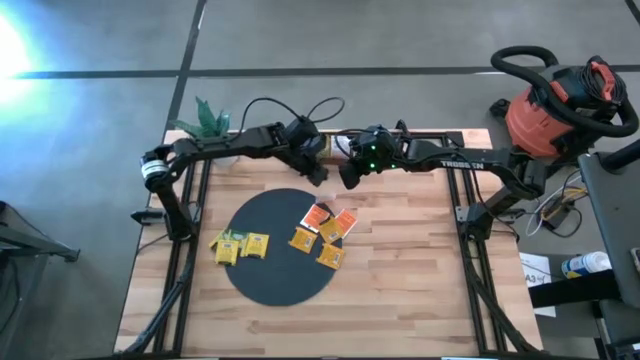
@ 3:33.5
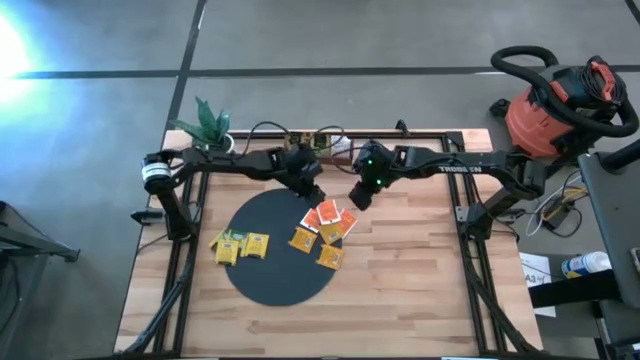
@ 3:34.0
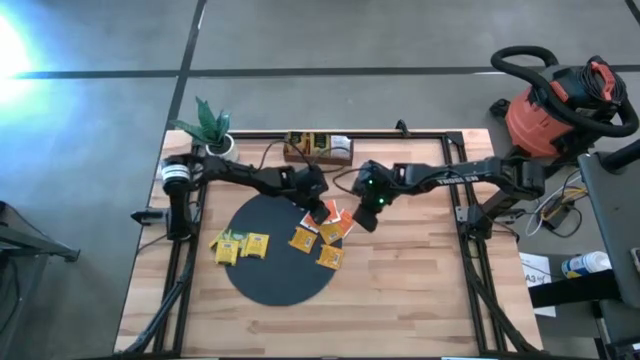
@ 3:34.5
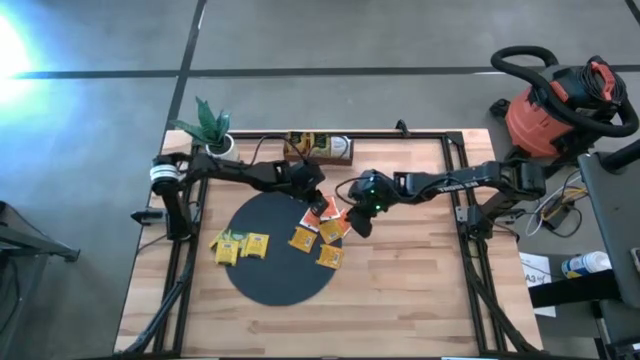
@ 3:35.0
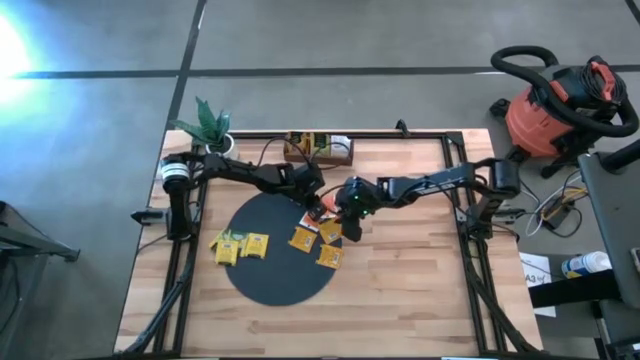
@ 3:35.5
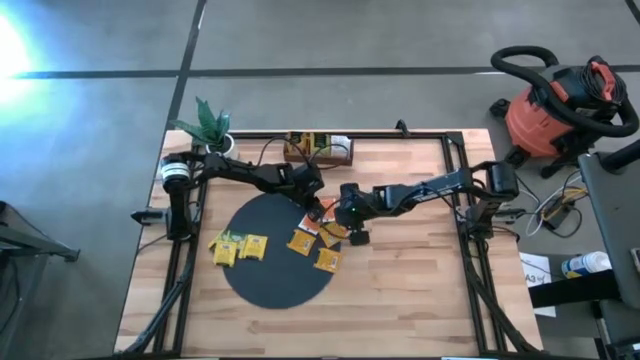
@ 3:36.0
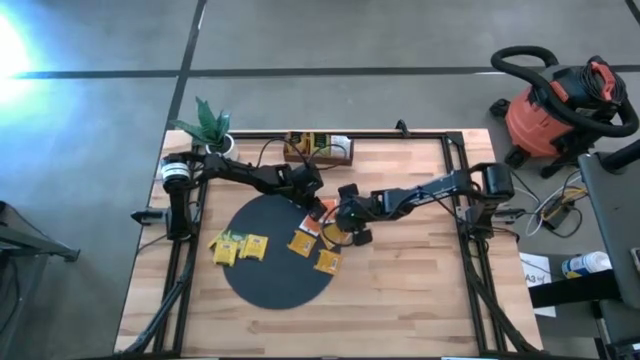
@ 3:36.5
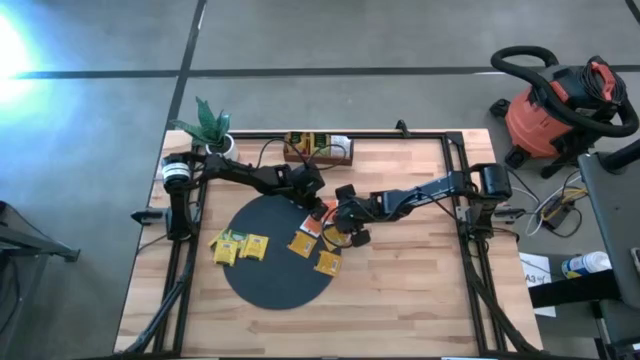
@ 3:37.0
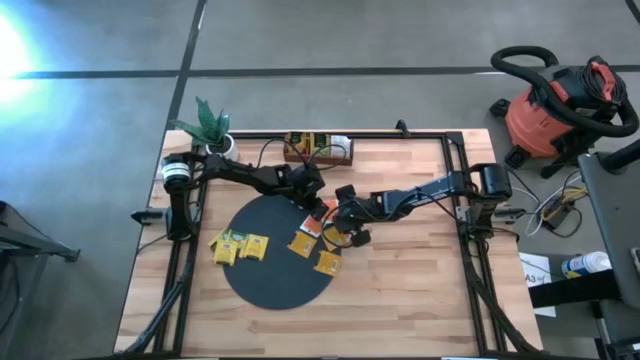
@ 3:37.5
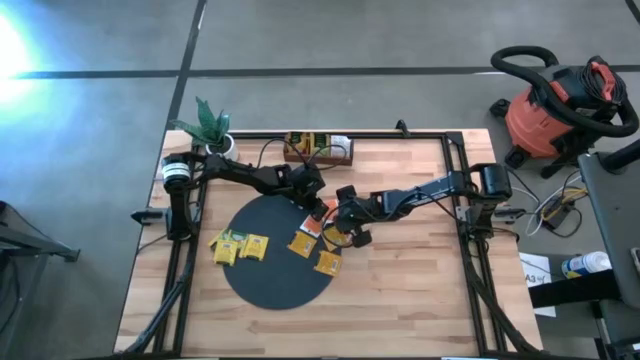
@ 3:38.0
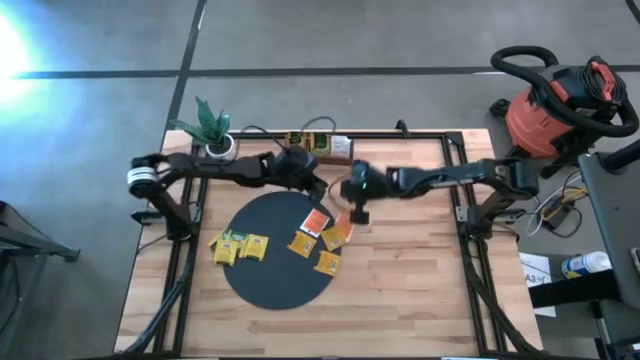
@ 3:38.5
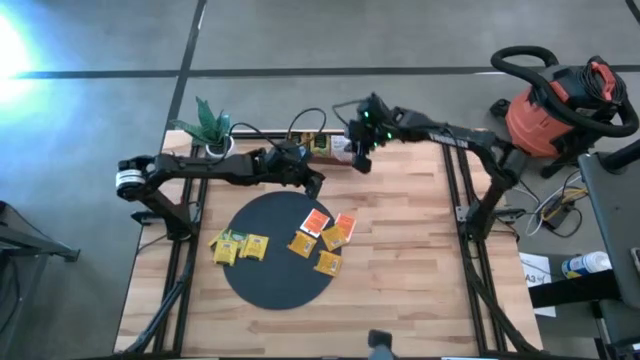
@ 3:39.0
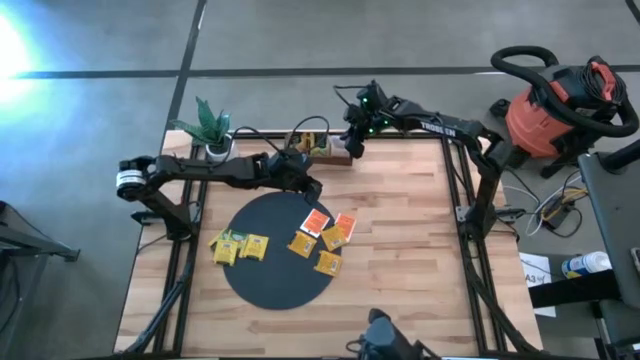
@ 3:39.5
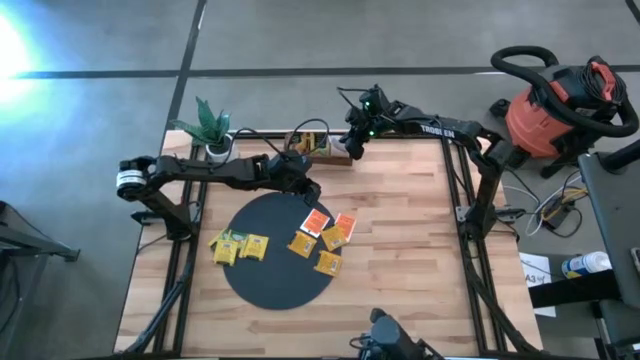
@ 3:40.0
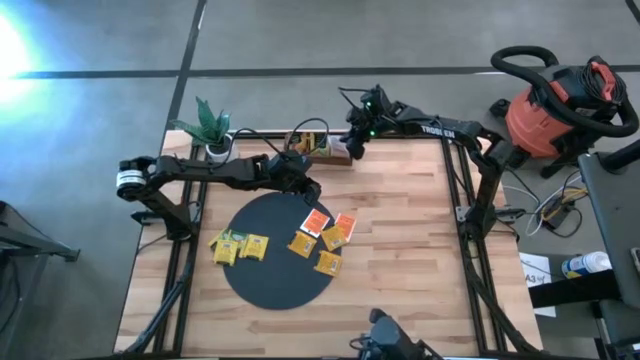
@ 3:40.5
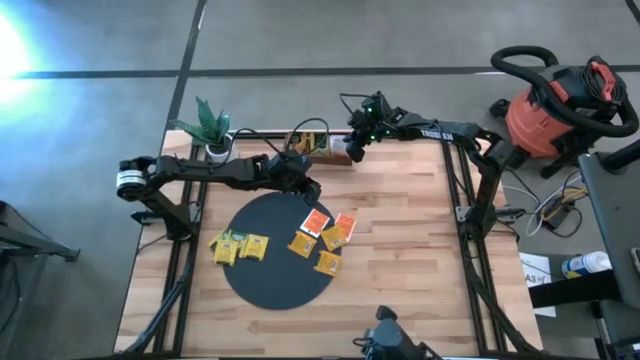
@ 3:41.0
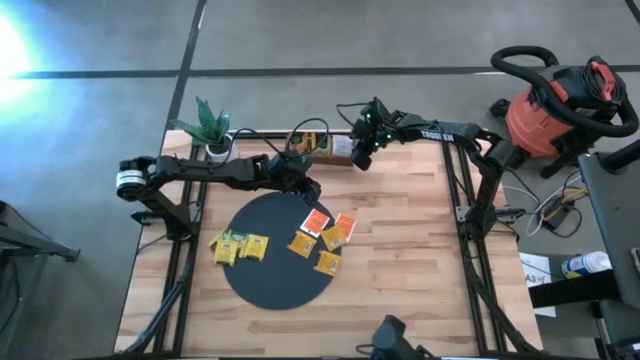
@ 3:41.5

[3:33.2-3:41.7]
Task: Pick & Place Tea
Put the white tea bag into the right section of the wooden organizer

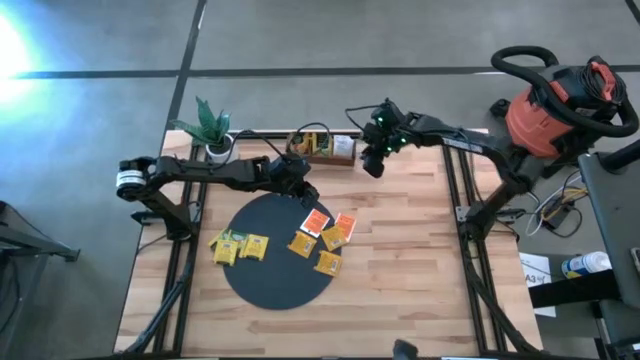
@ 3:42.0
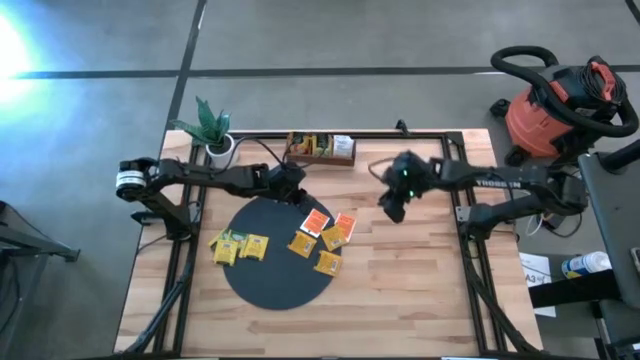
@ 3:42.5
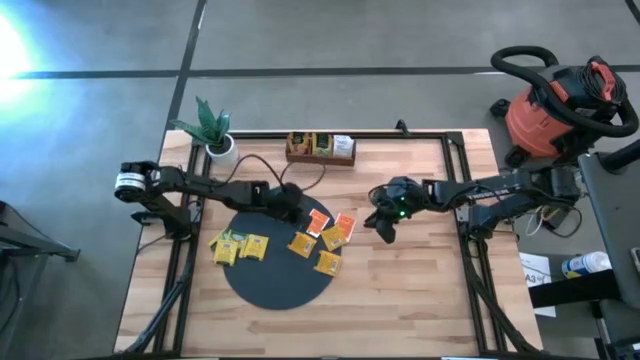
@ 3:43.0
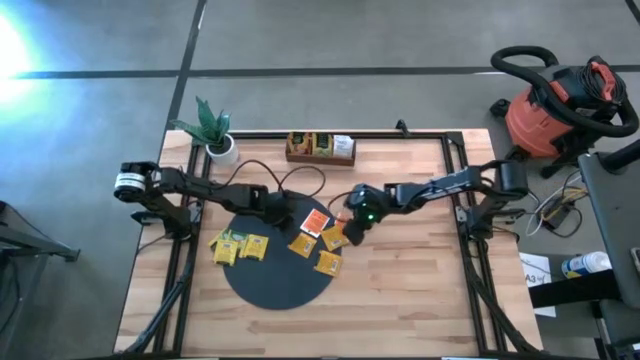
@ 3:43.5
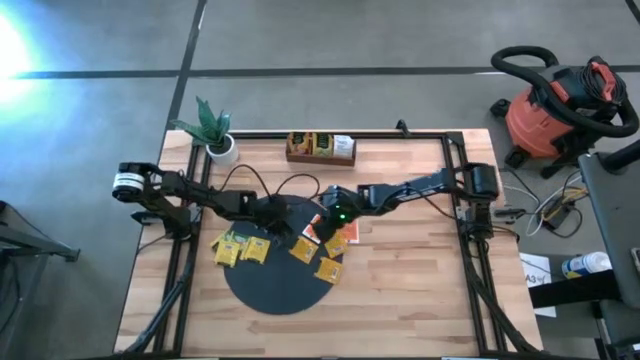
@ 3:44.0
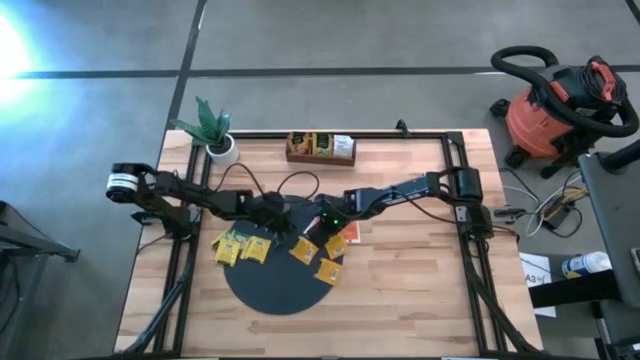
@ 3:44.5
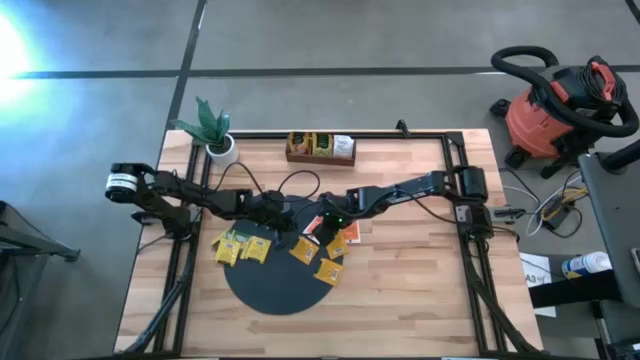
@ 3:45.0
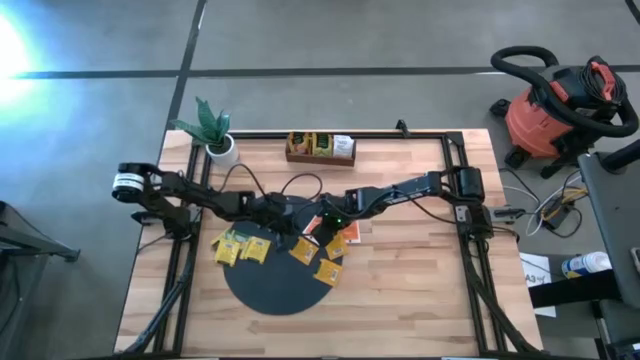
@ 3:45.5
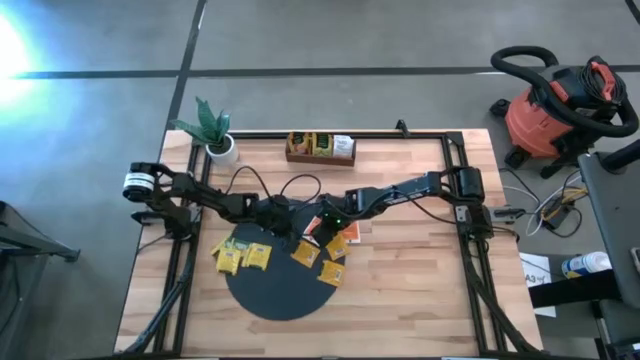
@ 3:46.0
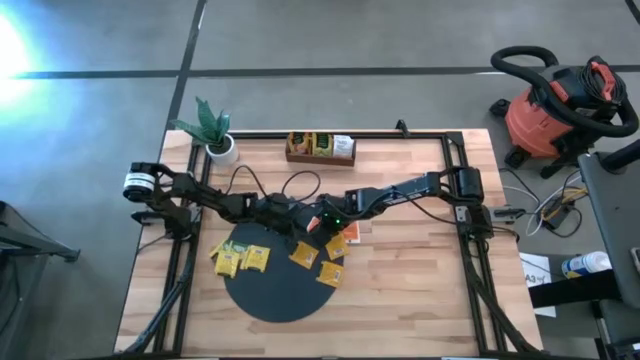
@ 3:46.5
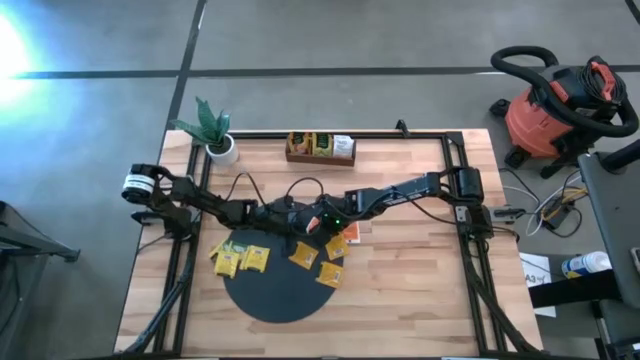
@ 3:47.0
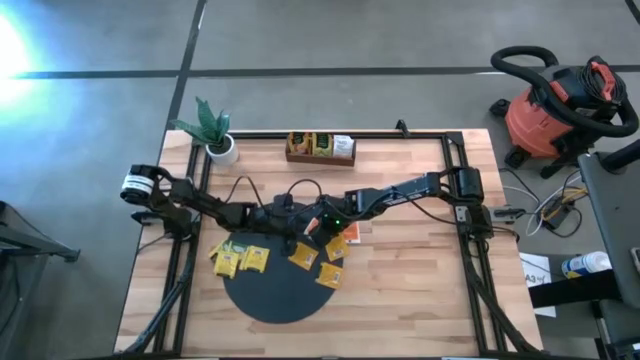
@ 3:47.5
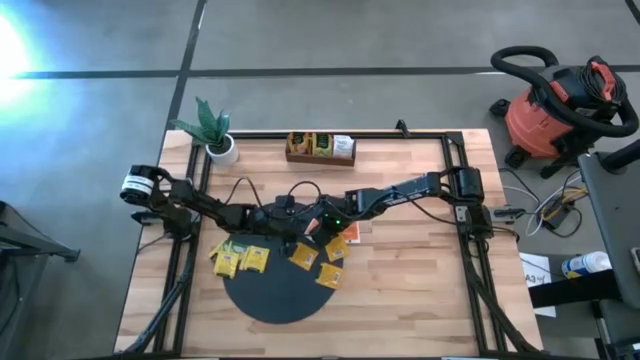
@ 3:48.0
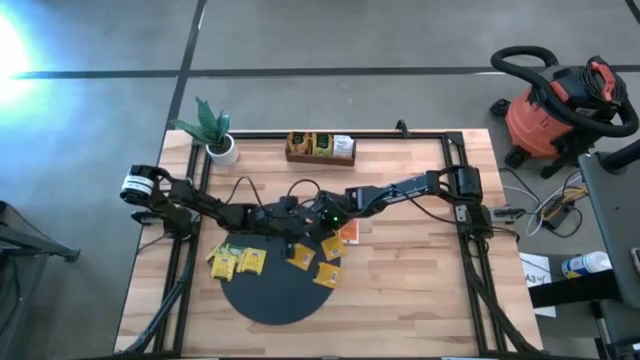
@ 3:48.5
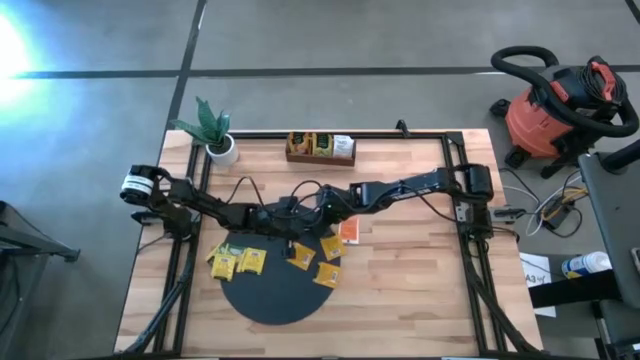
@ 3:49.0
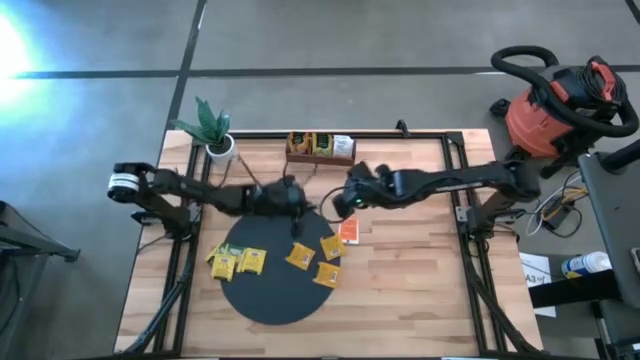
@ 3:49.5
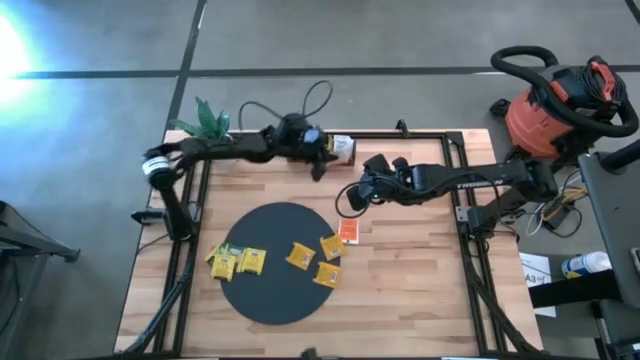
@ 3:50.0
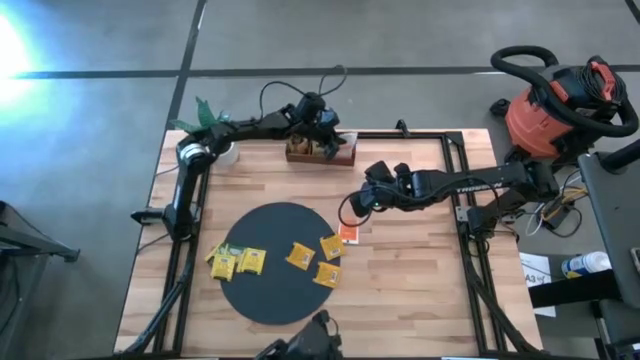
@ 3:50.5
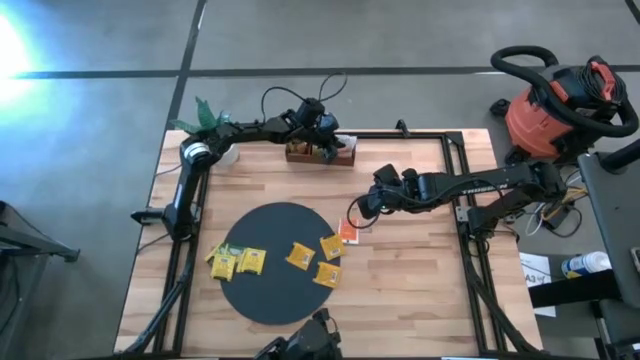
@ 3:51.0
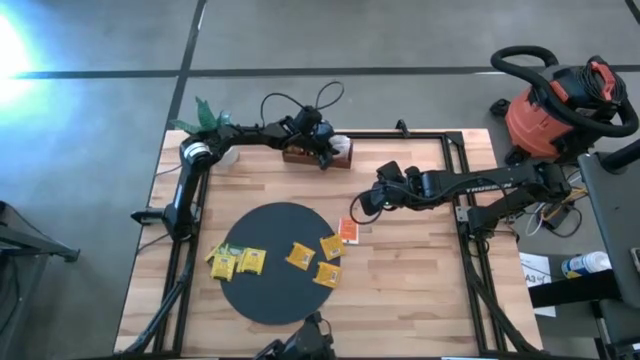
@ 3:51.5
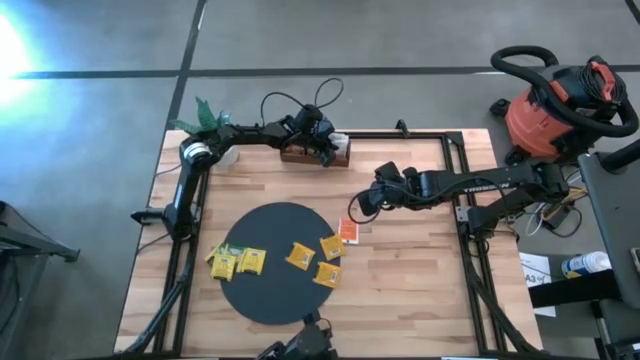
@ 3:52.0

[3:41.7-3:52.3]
Put the white tea bag into the right section of the wooden organizer

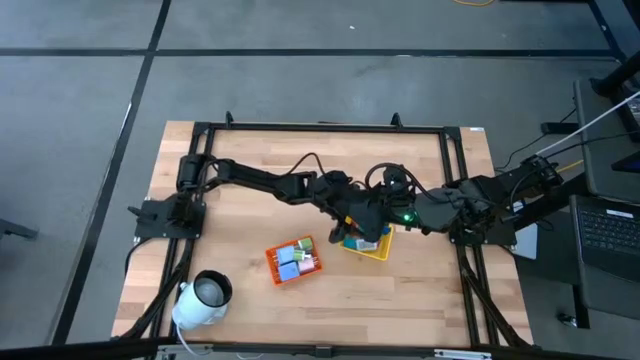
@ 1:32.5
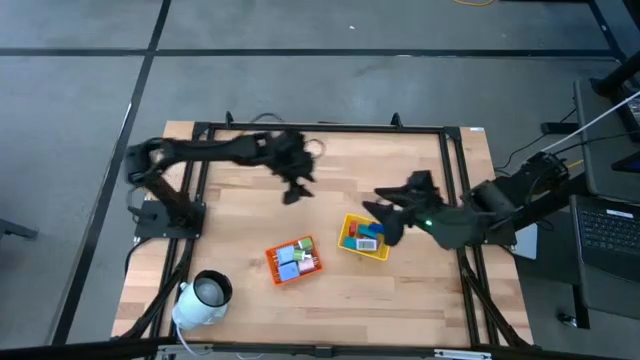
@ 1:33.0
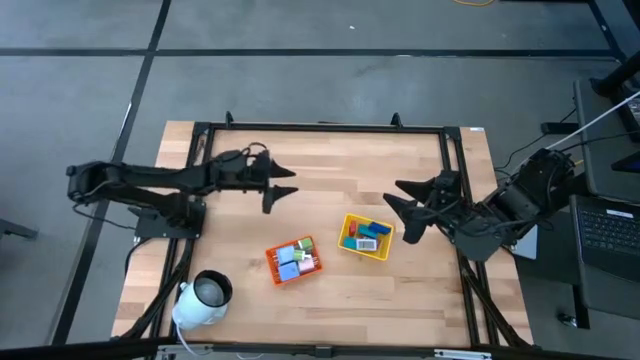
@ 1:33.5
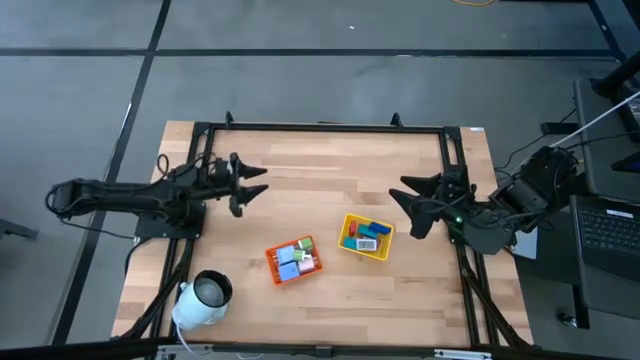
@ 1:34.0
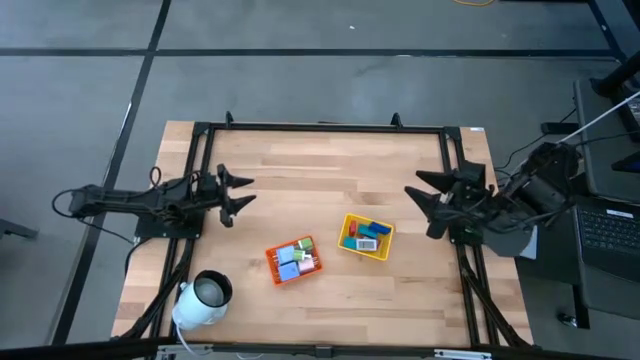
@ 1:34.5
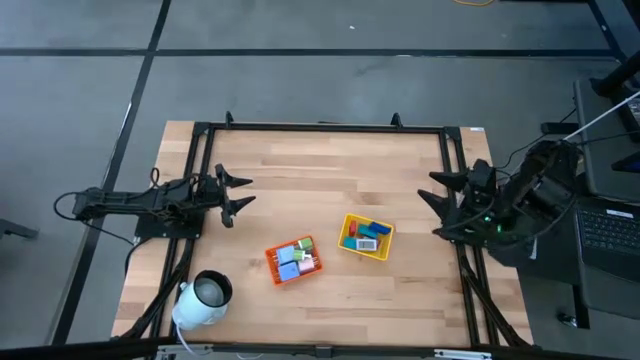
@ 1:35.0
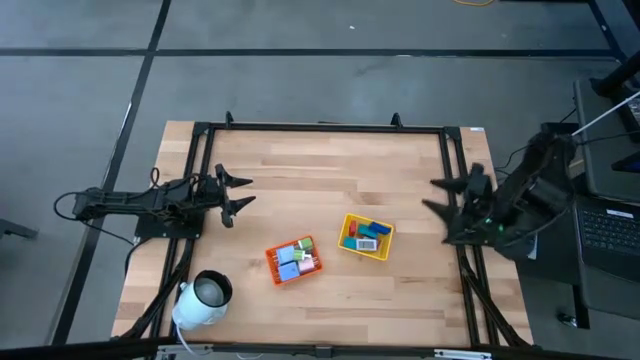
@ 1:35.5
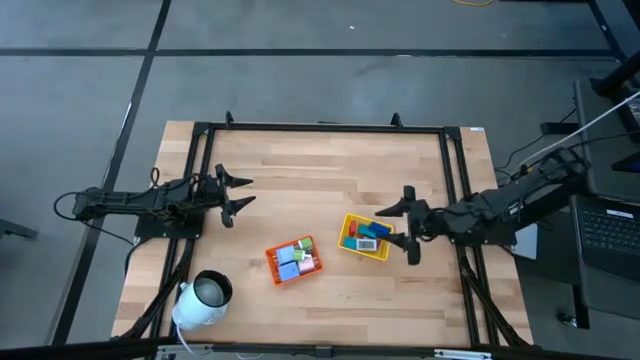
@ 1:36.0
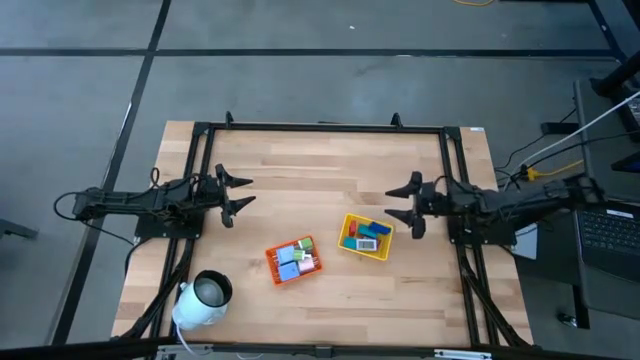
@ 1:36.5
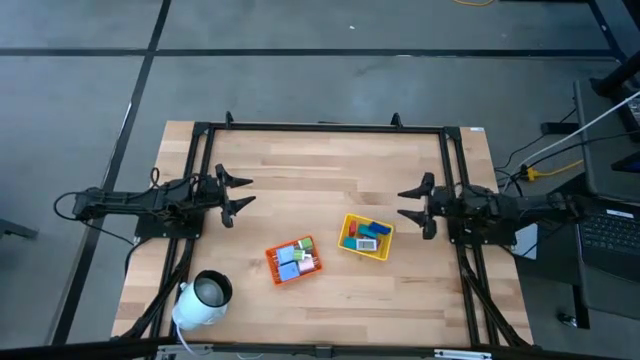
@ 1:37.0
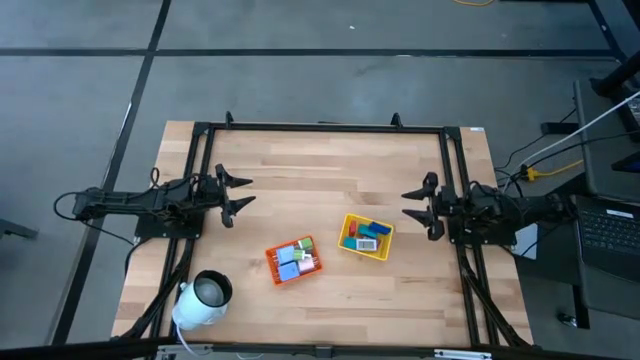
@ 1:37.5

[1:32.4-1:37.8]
Task: Pick & Place Office items
Return to Home Position
